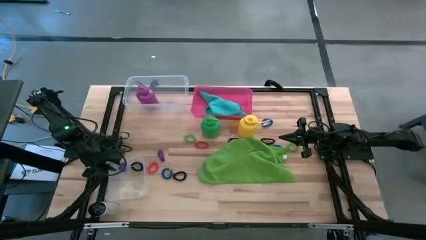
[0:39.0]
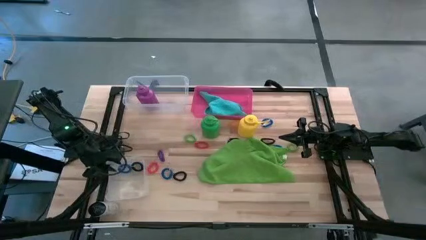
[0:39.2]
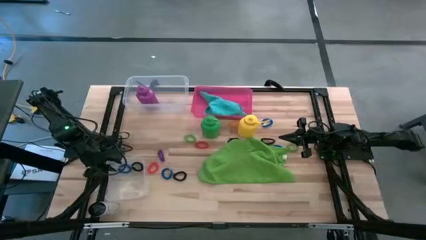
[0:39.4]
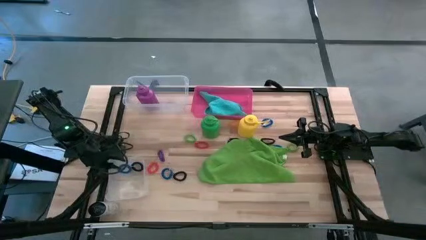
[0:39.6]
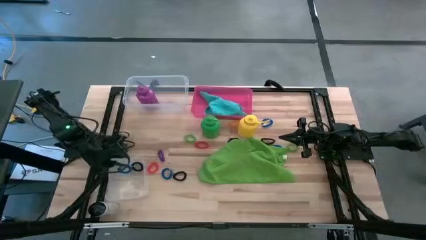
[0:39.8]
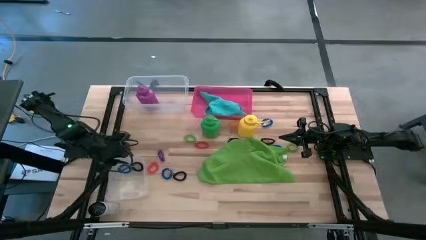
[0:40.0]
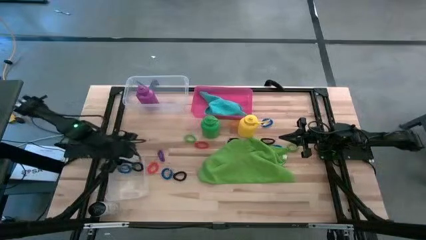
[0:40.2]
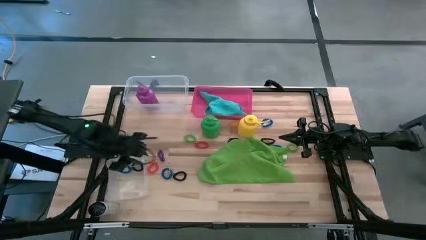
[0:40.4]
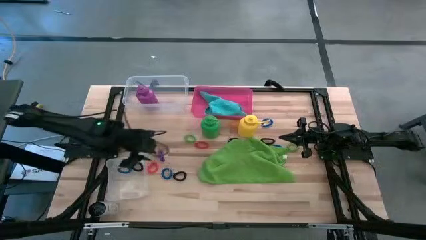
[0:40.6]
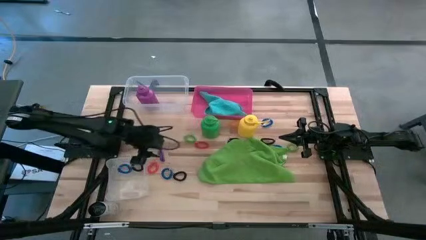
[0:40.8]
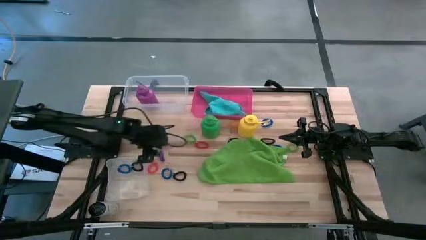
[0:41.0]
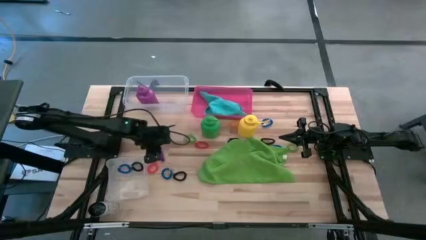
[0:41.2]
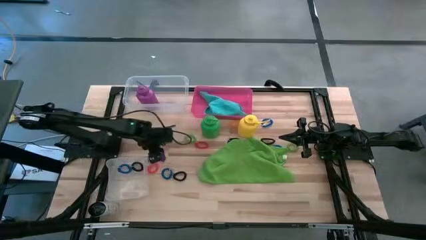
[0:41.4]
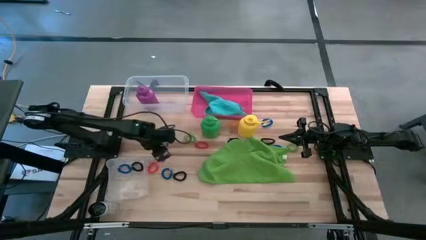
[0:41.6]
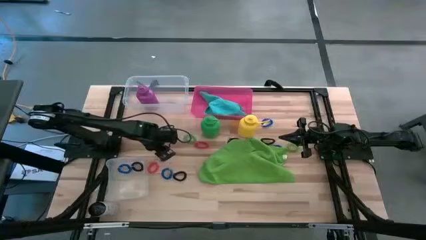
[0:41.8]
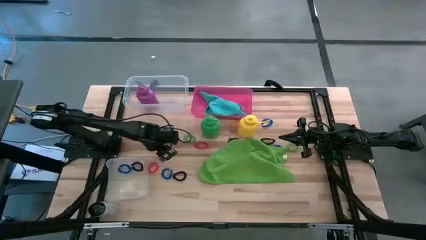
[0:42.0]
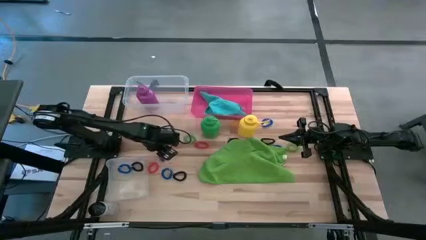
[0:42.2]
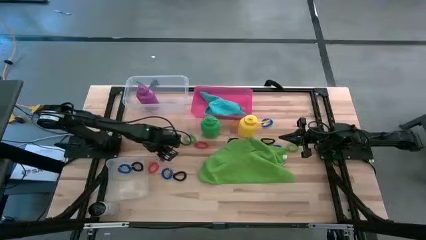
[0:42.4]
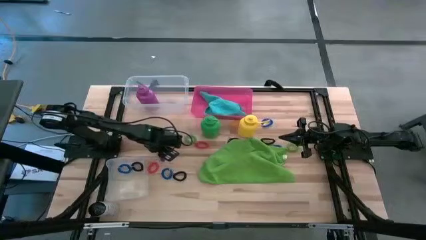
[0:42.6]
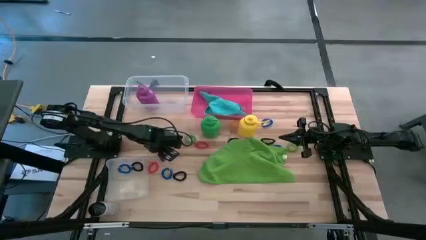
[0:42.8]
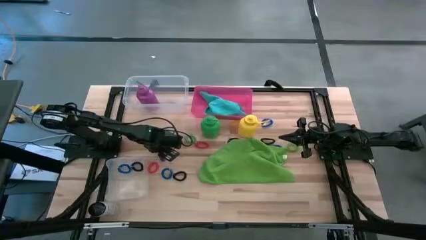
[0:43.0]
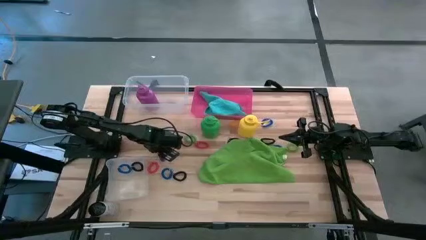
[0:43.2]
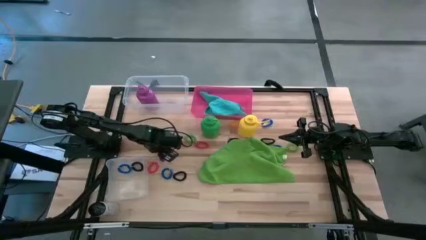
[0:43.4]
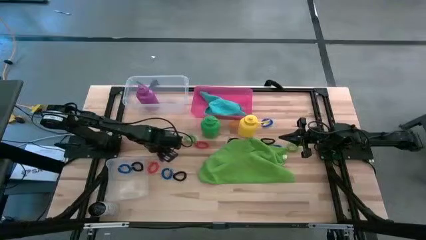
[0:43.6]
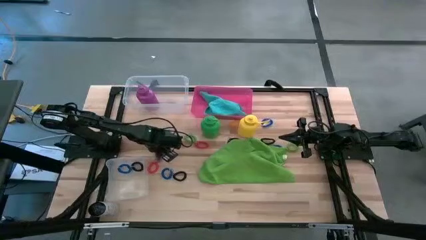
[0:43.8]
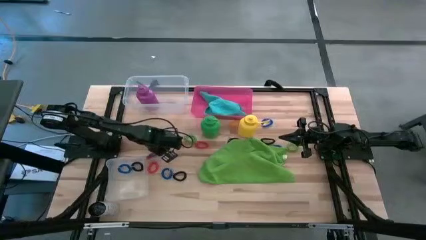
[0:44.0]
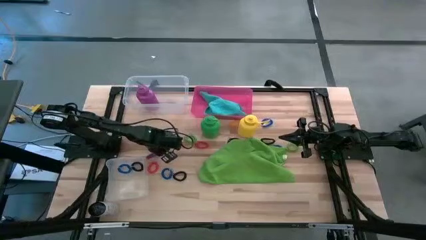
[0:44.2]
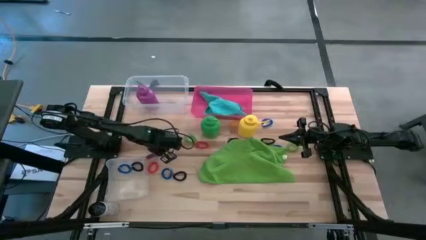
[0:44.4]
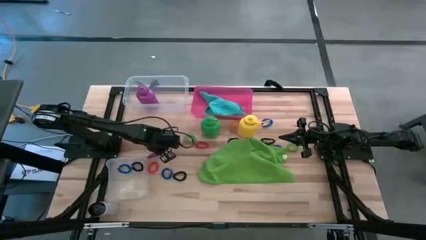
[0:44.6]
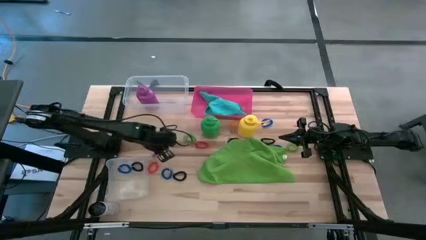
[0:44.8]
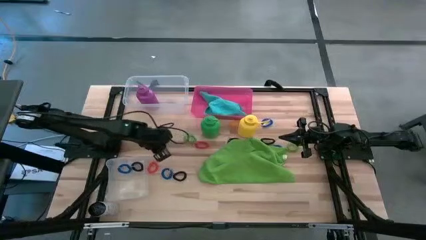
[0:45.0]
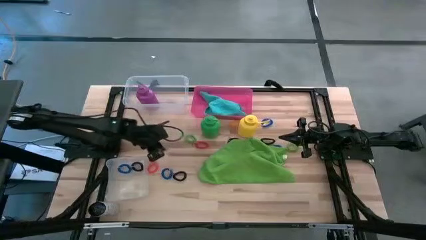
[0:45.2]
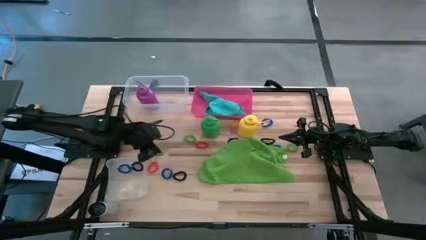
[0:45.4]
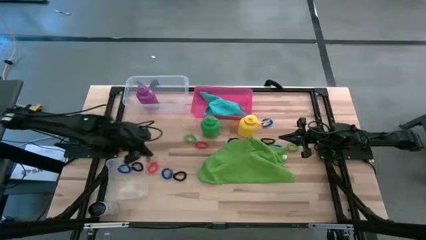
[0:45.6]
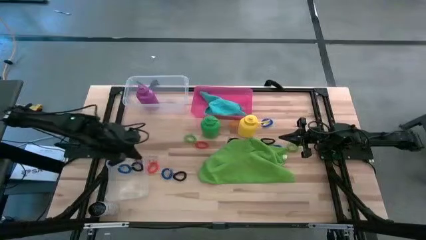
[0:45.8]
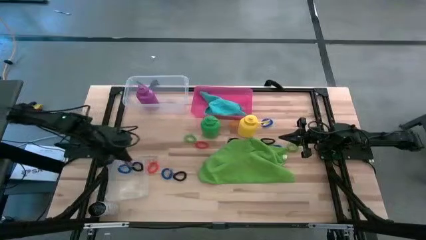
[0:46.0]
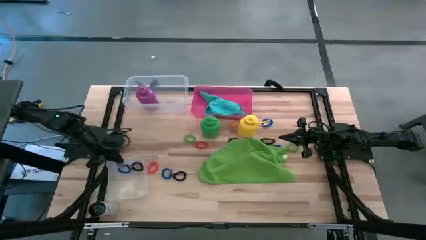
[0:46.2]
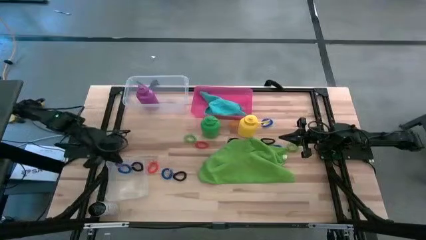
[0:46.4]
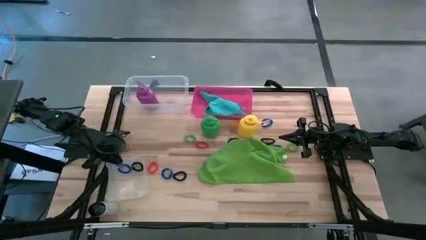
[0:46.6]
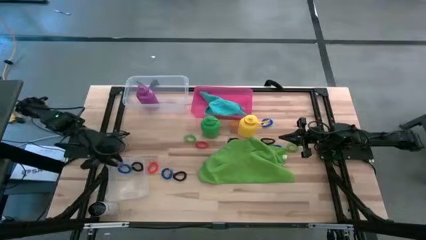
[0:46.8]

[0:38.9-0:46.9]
Task: Pick & Place Sports Items
Put the purple spring keychain into the bottom transparent bin

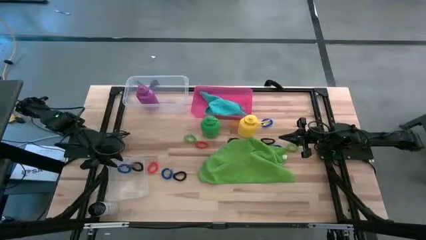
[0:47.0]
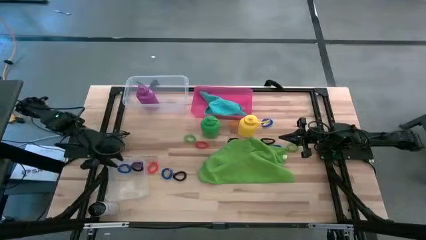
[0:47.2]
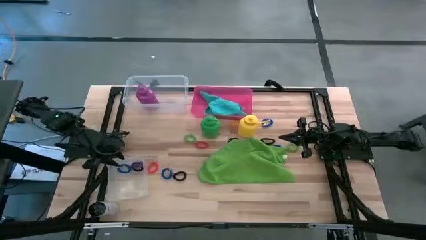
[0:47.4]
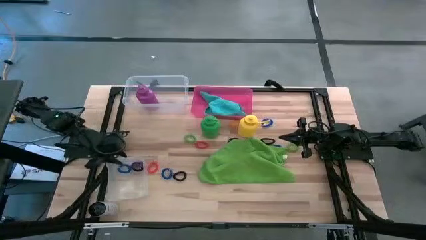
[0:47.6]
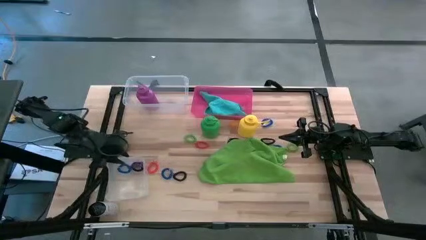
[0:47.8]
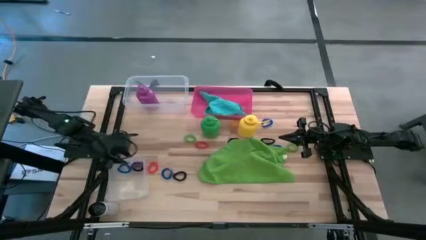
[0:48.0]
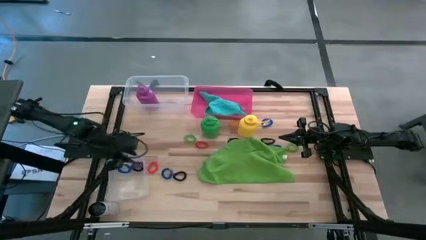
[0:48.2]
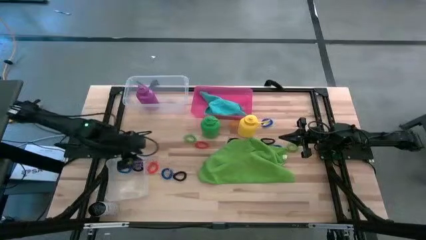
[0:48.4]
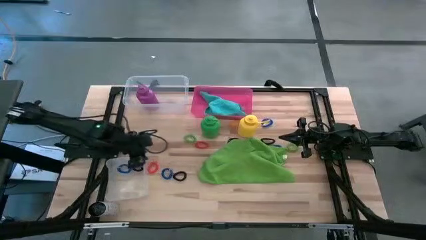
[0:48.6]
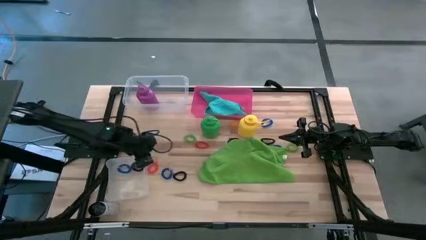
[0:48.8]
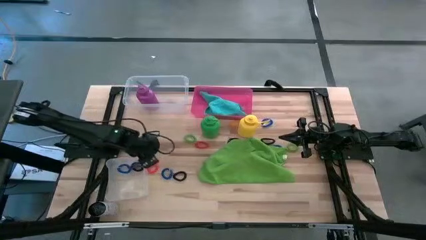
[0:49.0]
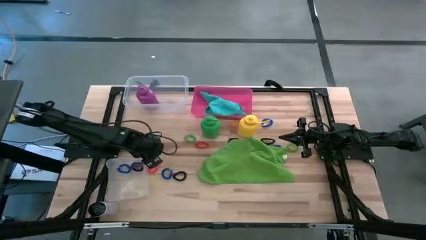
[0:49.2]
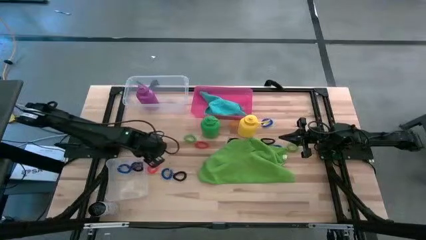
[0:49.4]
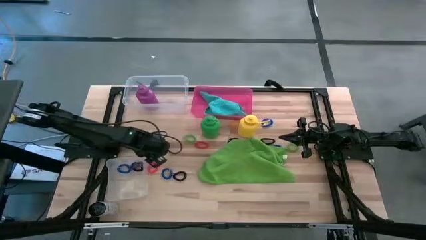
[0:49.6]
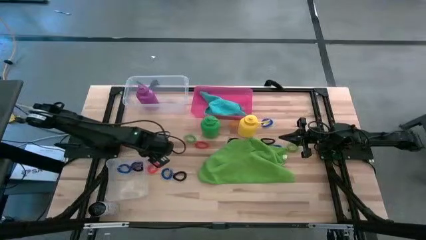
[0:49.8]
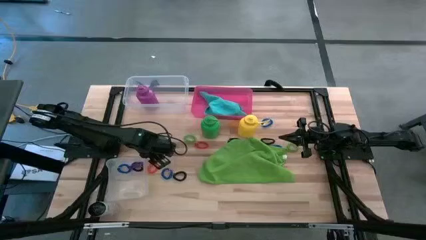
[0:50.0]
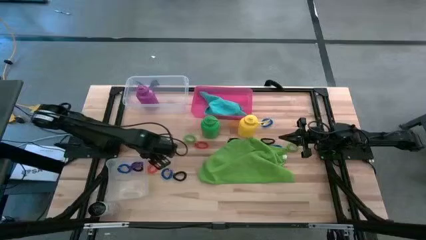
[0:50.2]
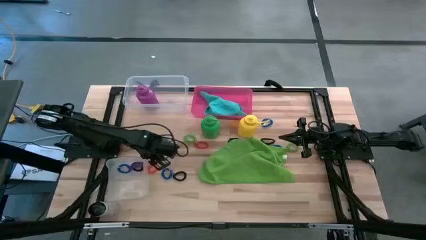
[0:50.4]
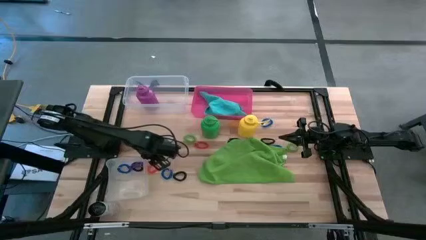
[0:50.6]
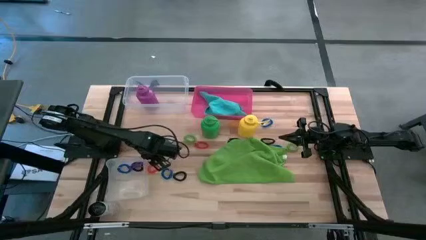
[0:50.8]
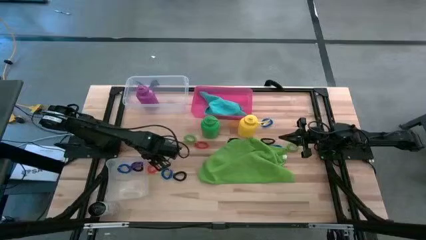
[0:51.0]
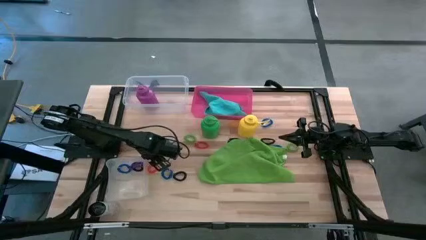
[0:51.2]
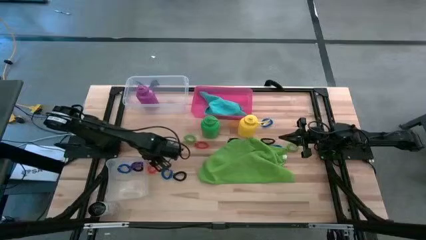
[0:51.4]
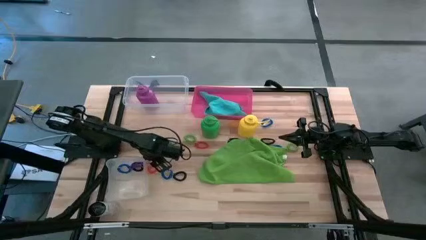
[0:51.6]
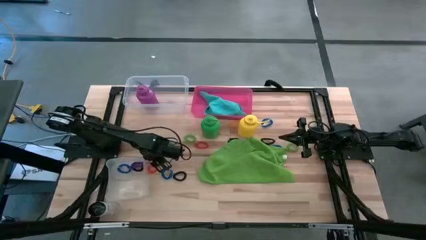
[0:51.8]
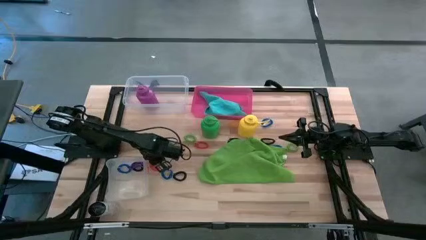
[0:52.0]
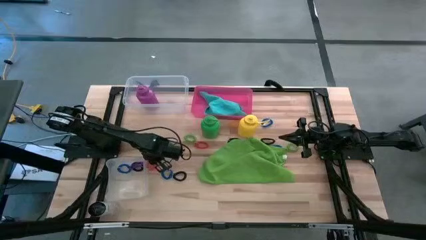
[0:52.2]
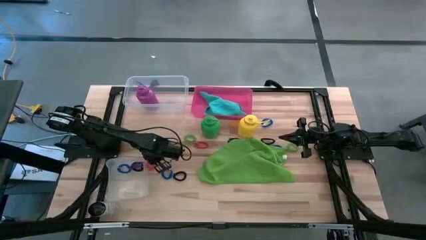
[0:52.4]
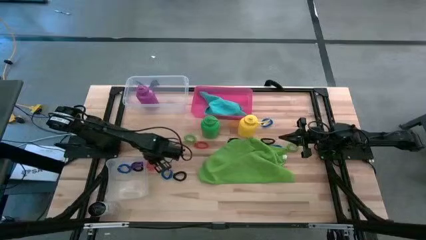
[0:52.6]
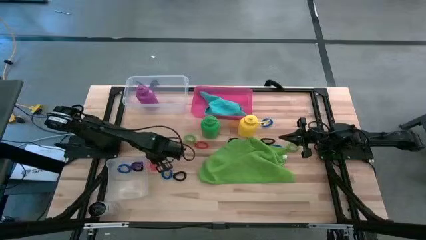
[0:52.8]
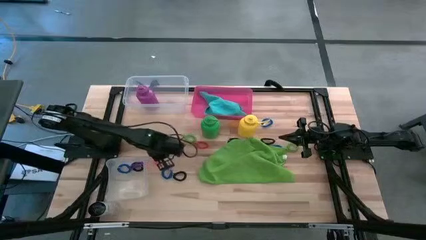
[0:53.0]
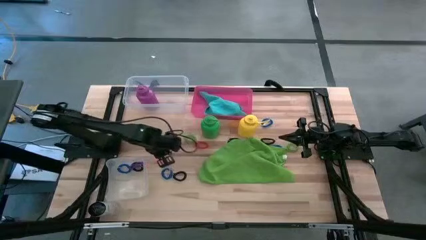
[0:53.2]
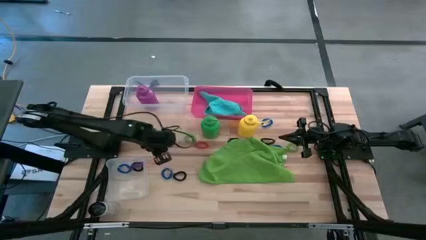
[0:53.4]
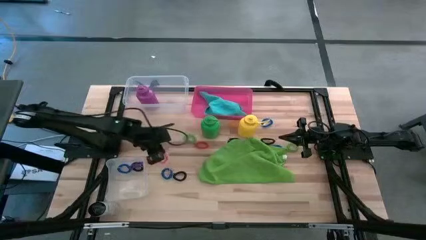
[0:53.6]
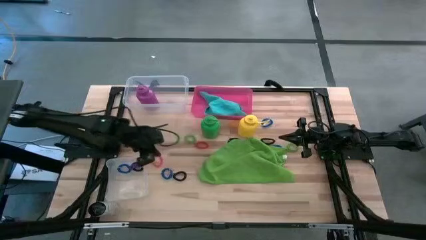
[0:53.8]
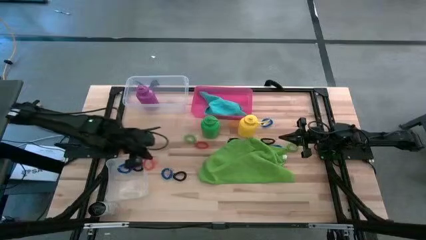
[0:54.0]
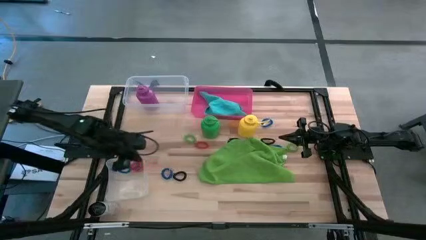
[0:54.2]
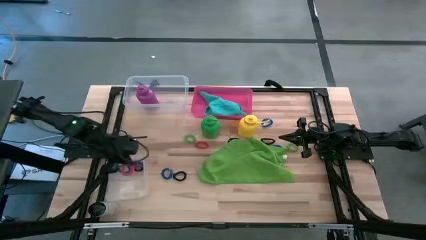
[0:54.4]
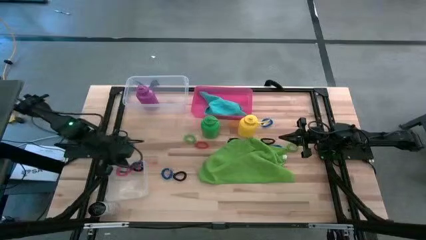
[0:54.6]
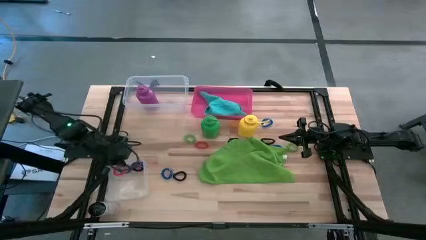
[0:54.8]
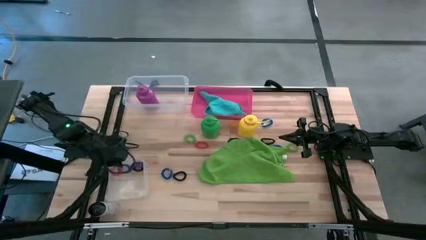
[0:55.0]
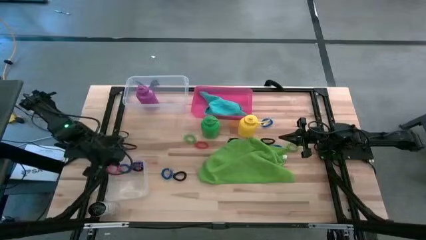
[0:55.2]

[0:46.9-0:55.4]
Put the orange spring keychain into the bottom transparent bin
